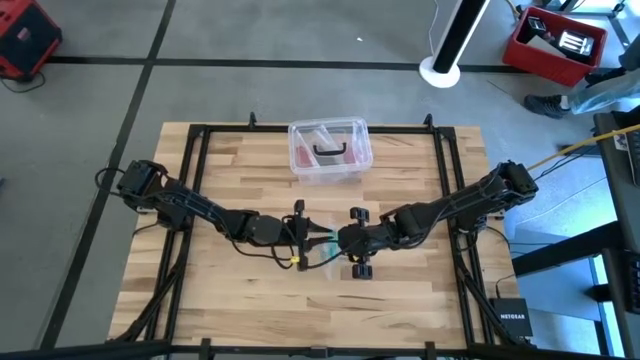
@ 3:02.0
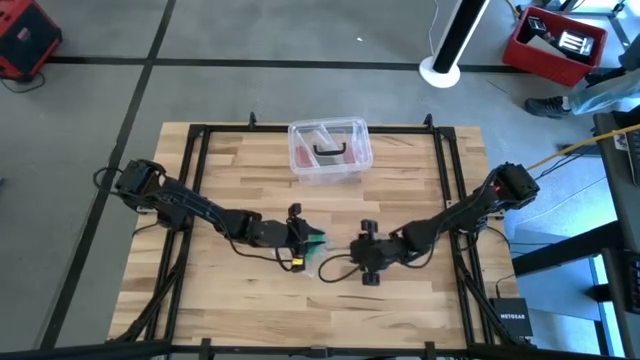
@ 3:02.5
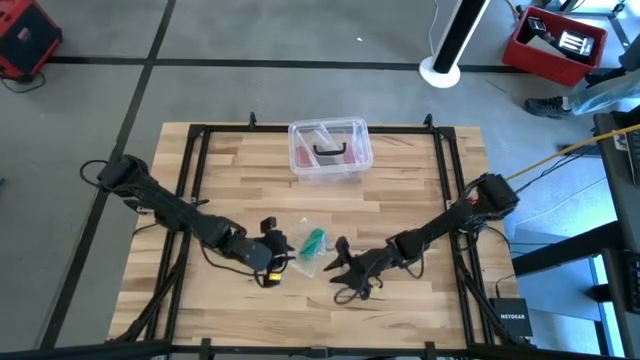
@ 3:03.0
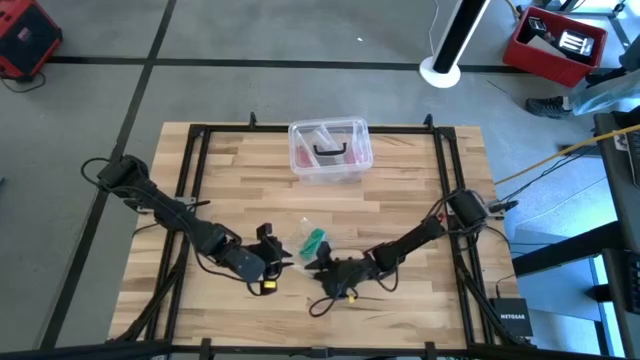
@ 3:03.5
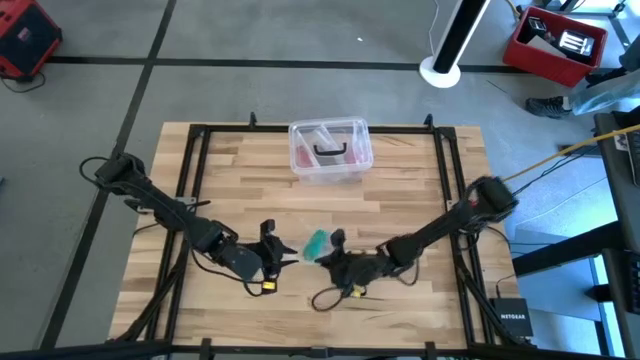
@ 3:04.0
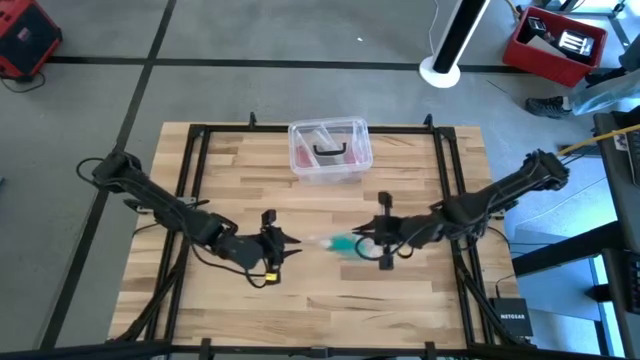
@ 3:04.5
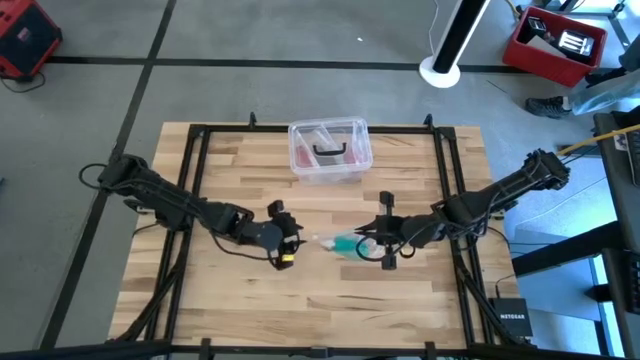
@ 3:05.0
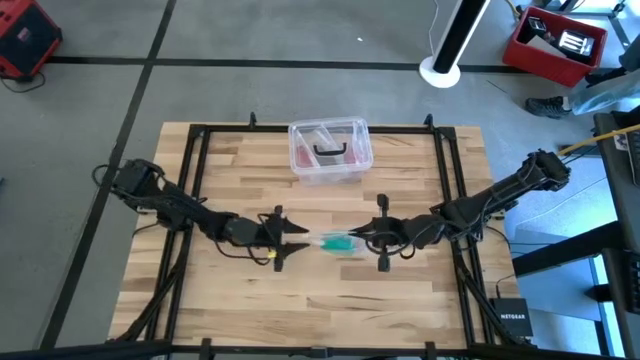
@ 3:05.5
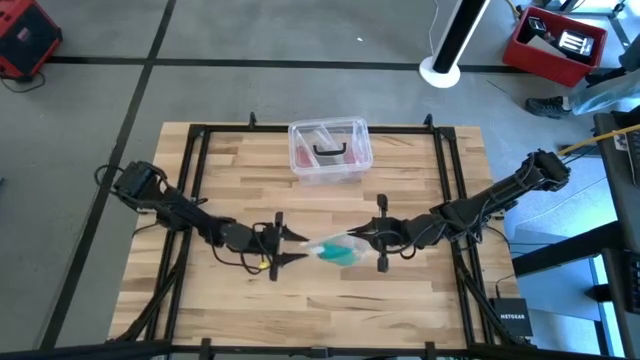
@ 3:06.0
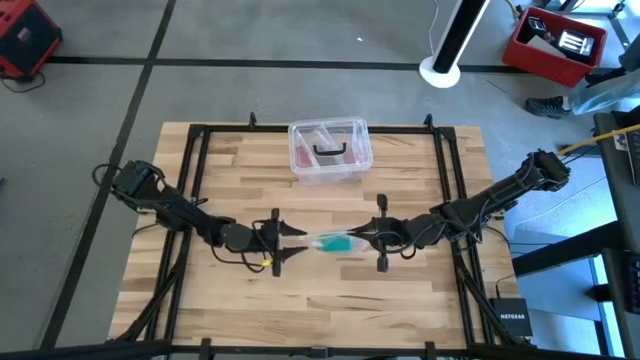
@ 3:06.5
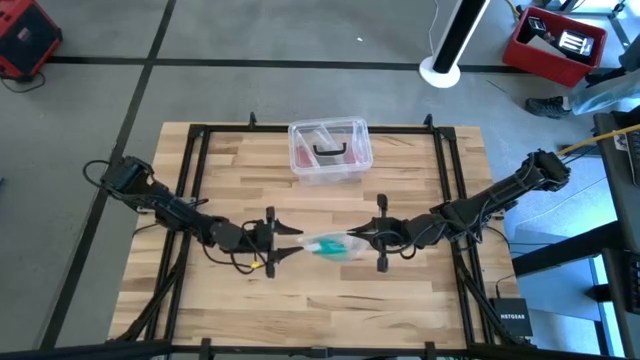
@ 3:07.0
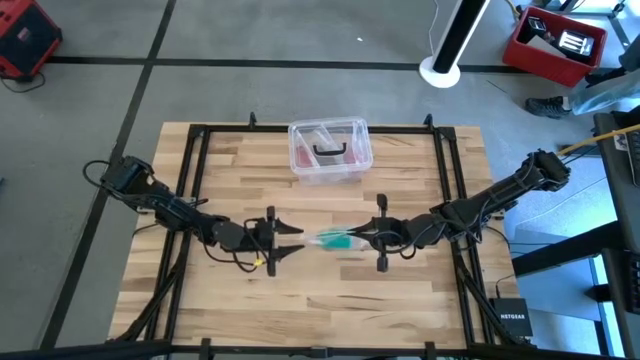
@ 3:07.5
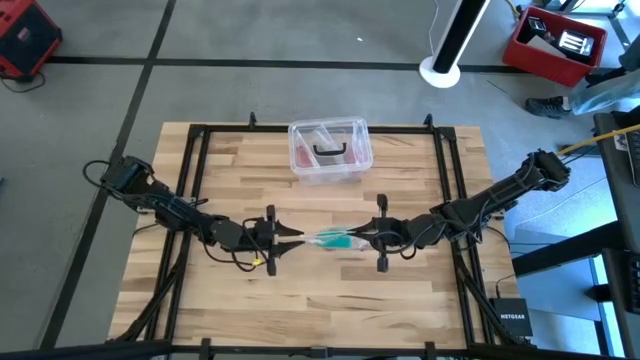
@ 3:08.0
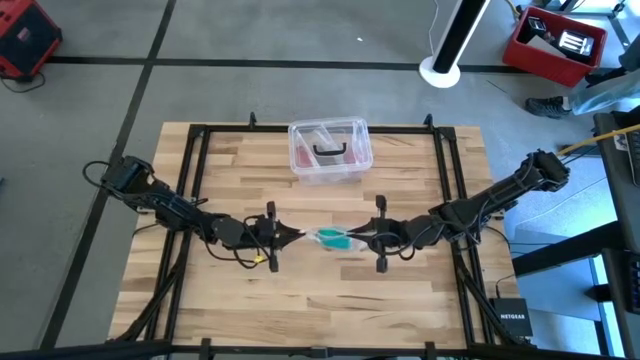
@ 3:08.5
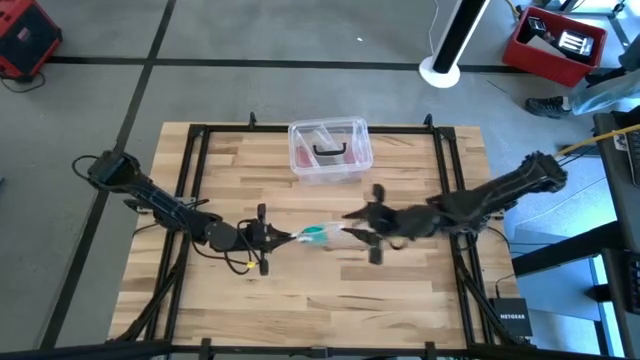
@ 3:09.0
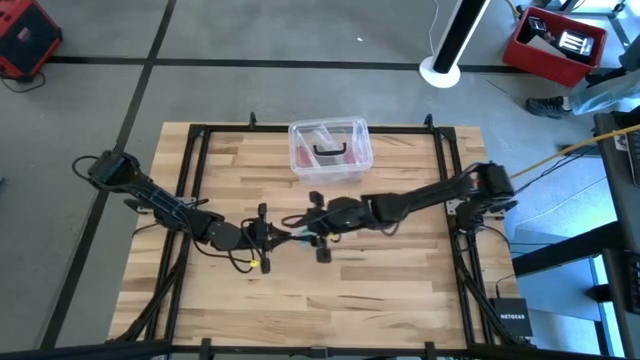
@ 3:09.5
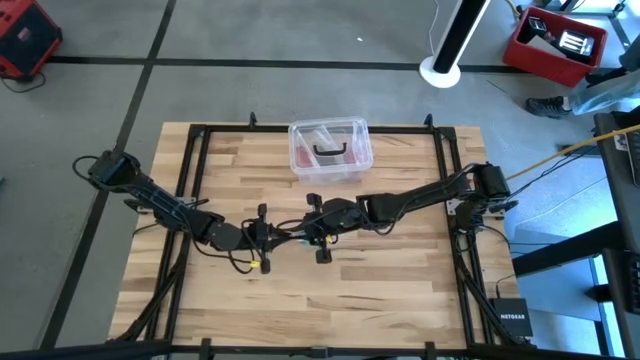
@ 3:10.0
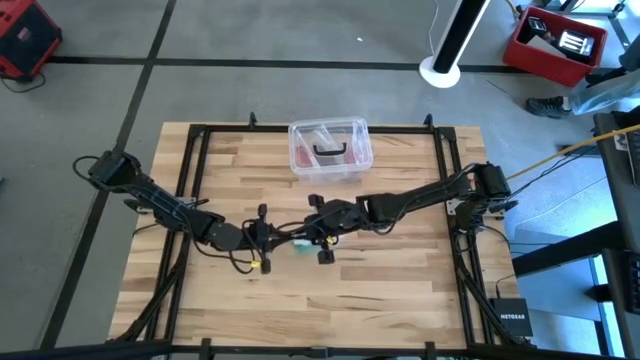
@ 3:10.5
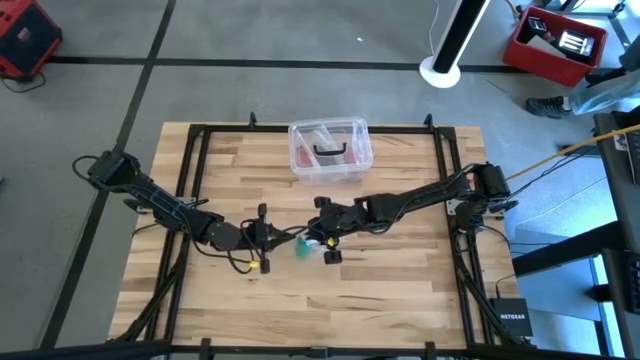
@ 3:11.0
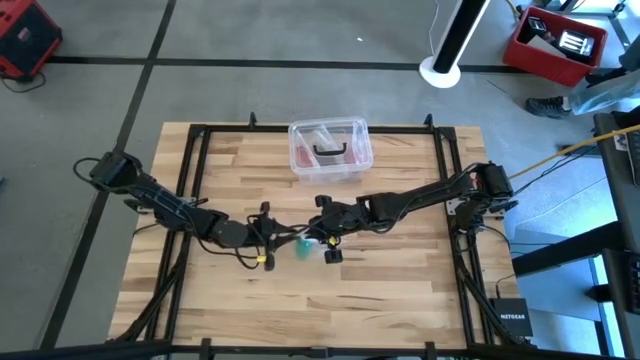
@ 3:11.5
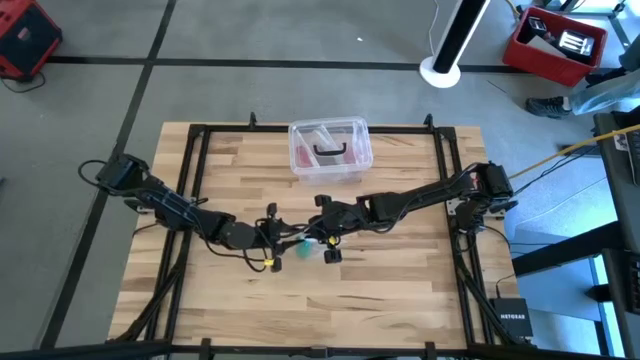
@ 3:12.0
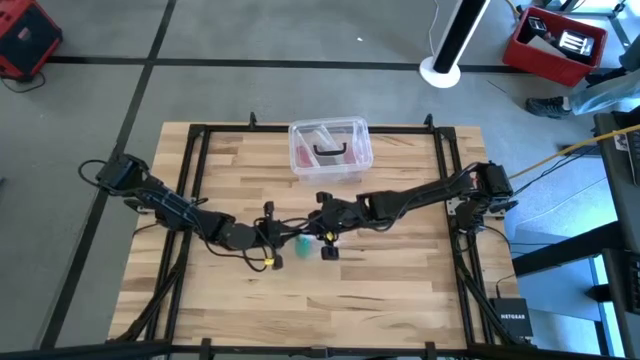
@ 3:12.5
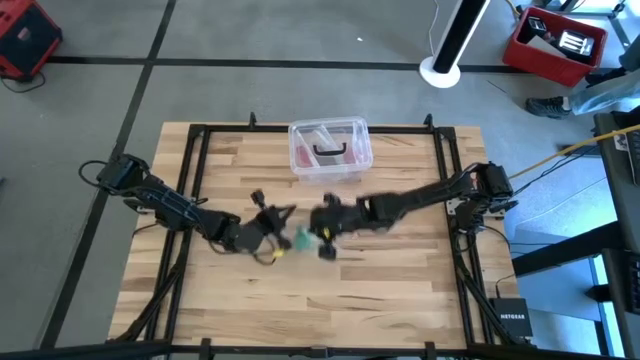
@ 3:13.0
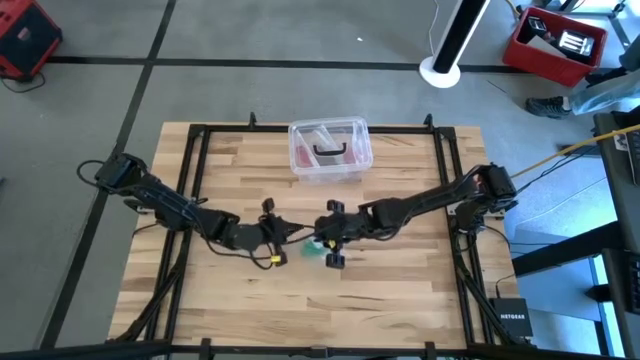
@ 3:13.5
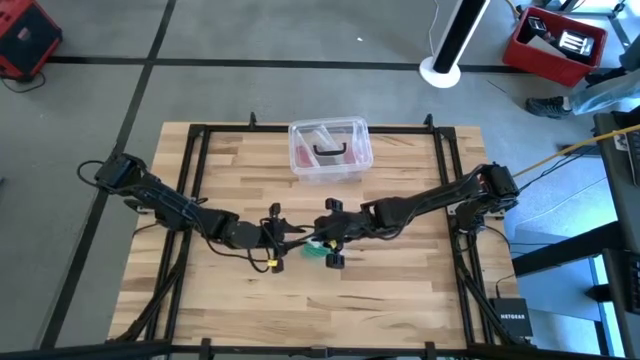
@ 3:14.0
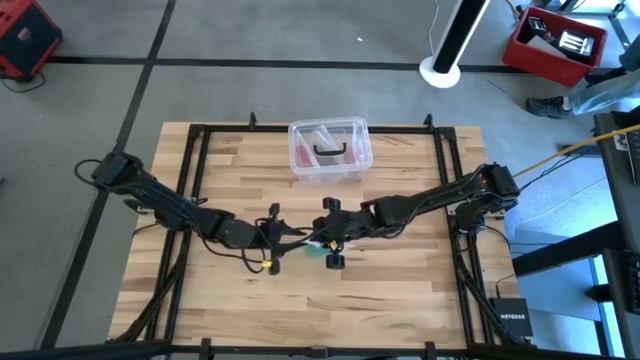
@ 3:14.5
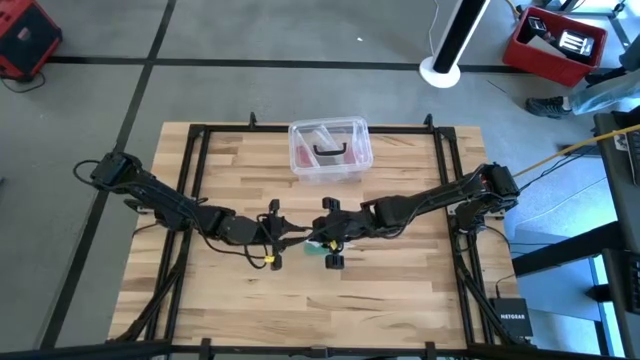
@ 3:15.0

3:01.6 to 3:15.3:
Task: Roll bandage
Close the transparent zip lock bag

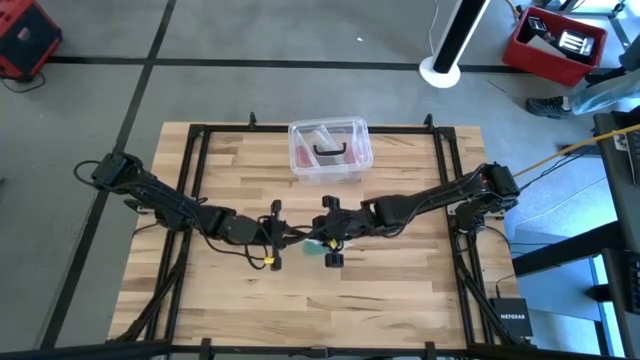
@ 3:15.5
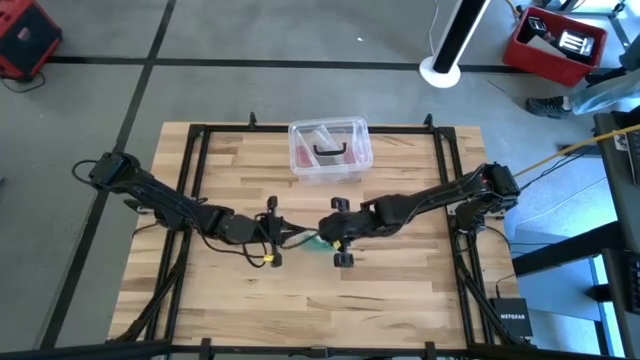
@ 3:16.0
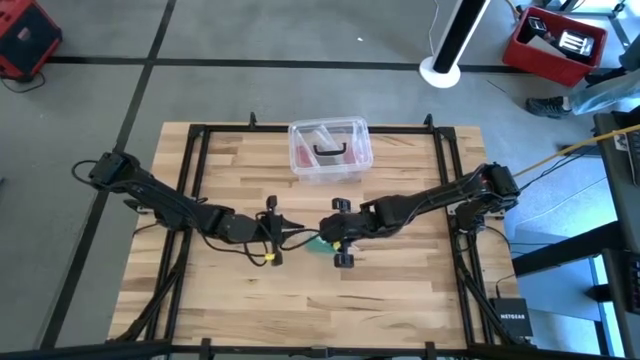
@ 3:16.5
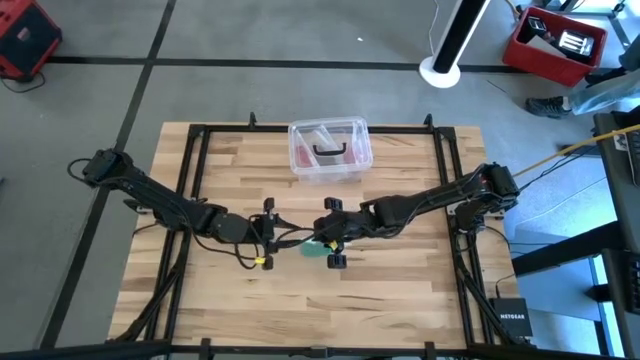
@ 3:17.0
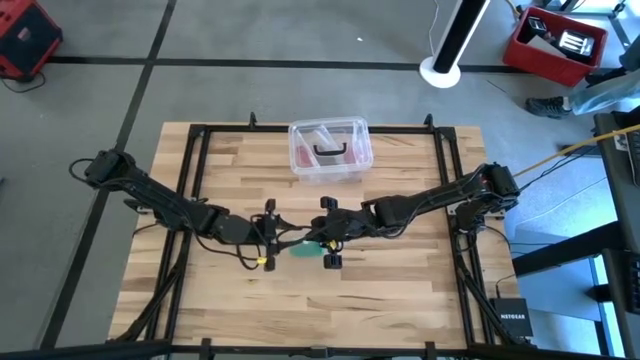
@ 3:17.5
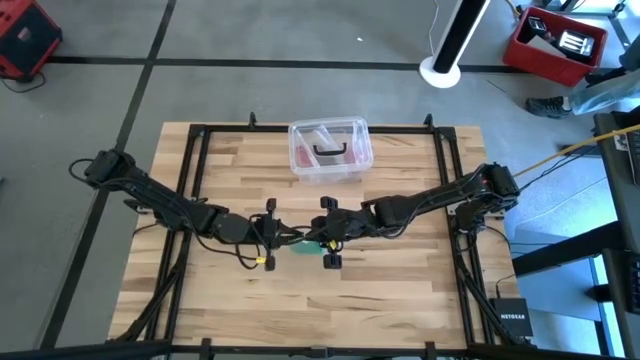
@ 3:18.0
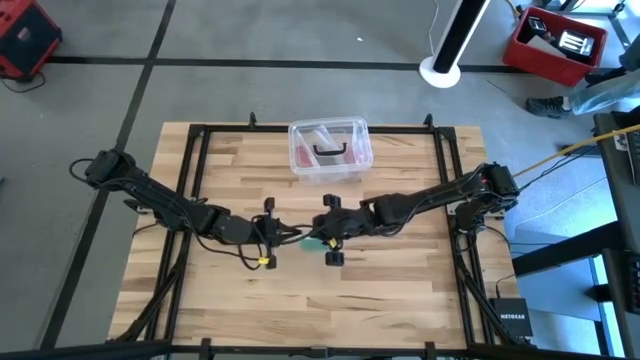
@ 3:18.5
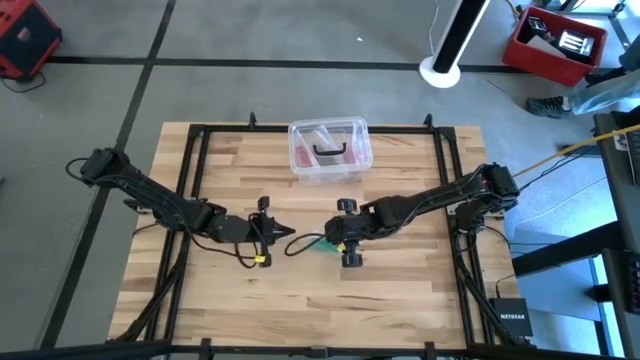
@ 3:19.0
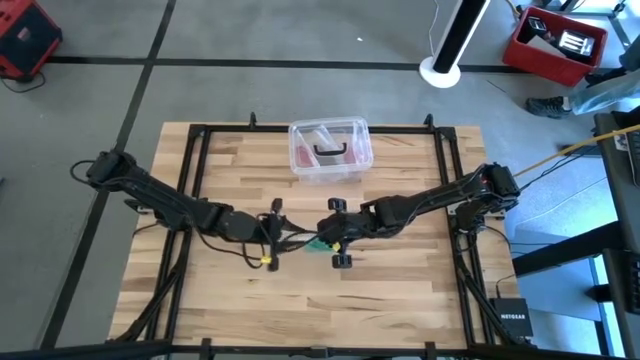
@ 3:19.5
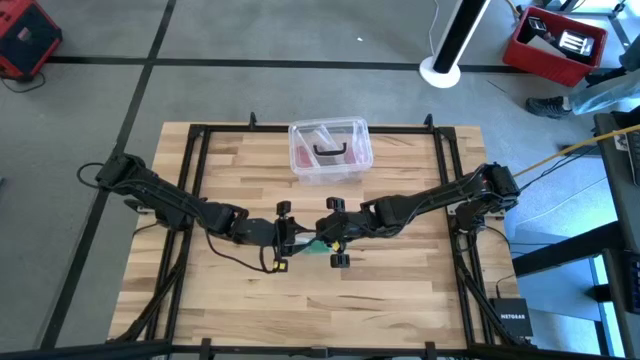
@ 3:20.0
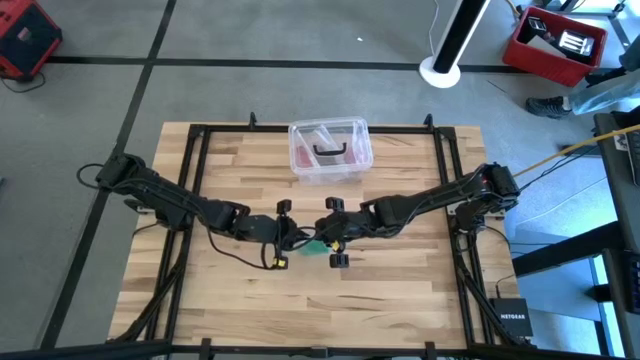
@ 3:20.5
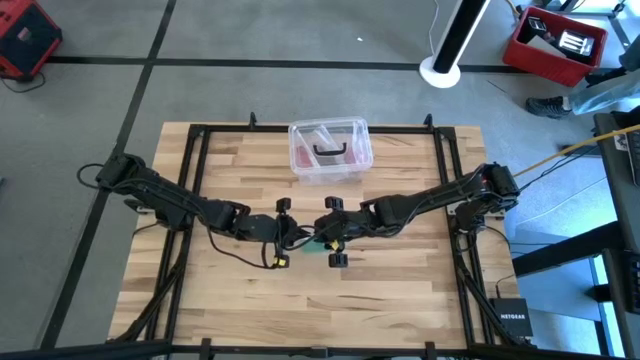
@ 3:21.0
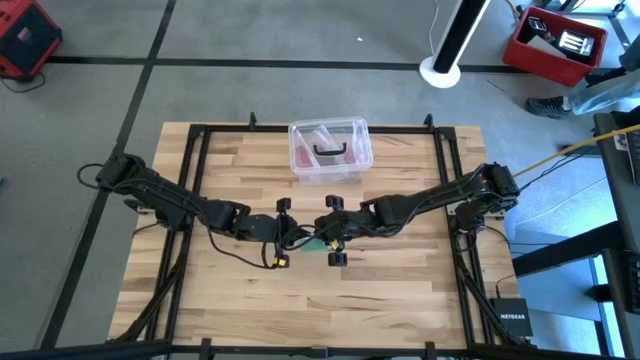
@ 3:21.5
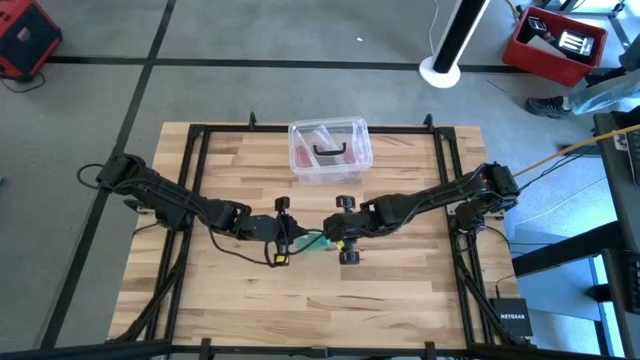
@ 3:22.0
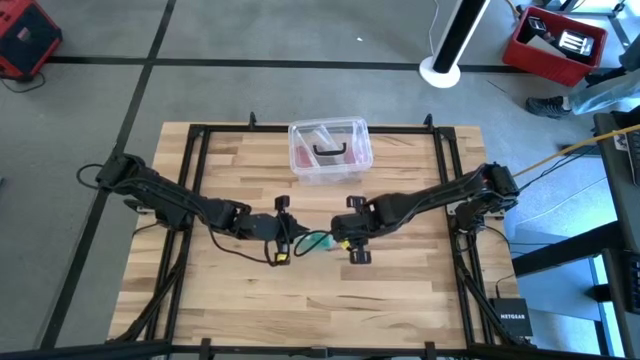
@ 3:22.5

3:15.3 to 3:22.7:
Close the transparent zip lock bag

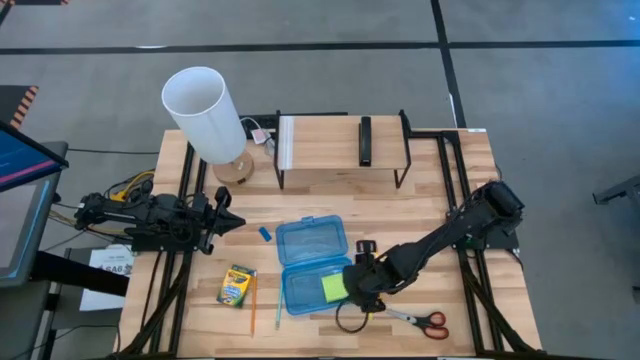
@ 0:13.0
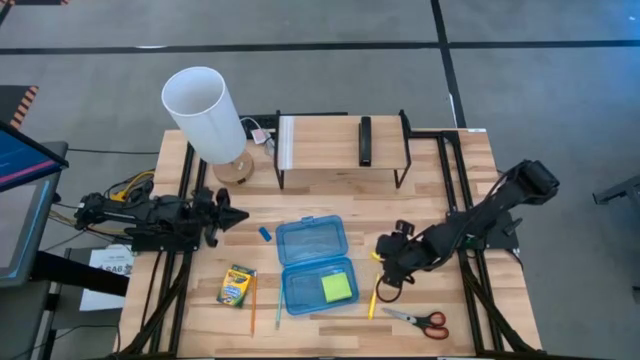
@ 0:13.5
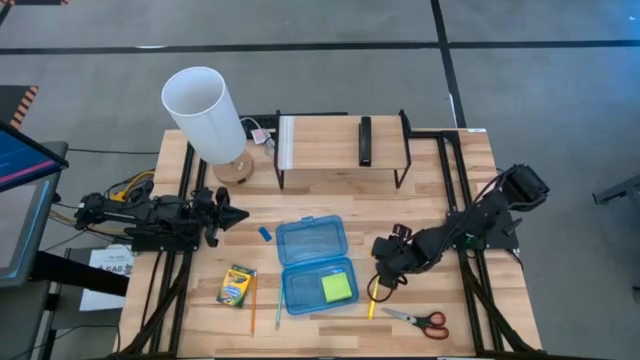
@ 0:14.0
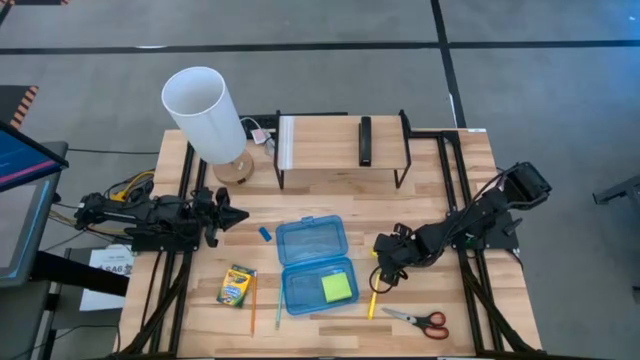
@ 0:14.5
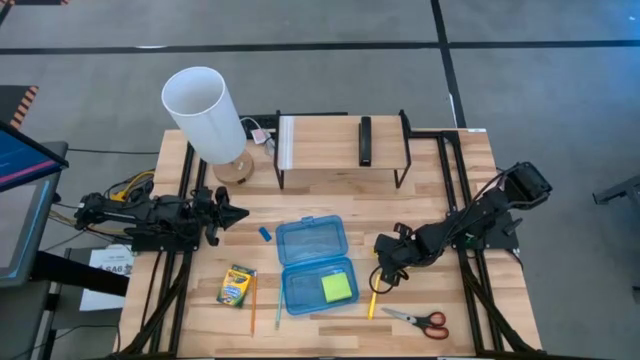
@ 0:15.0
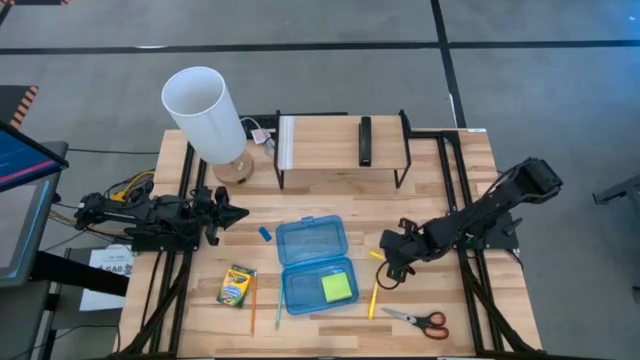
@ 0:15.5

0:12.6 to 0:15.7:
Task: Pack school essentials
Put the top yellow pen into the blue supply box
